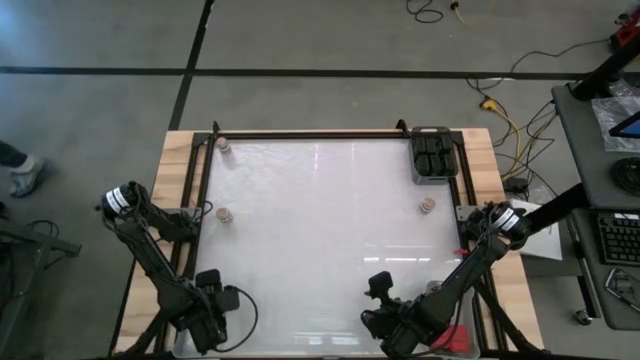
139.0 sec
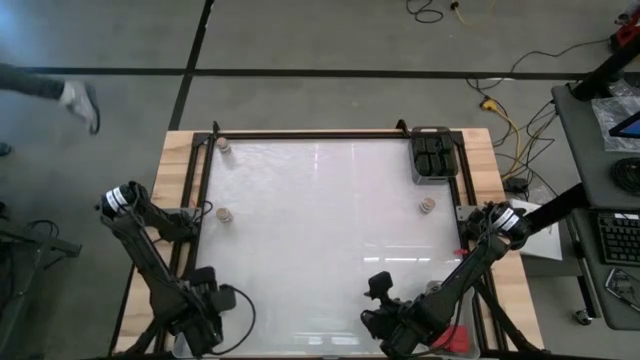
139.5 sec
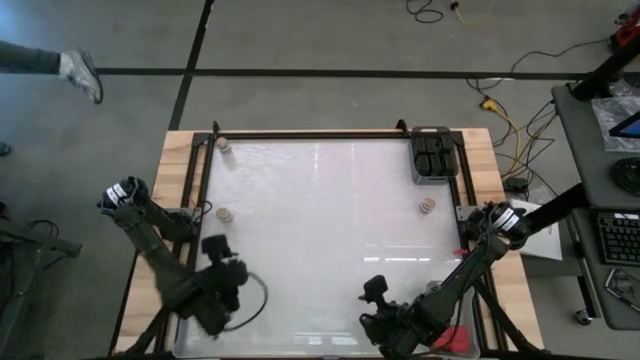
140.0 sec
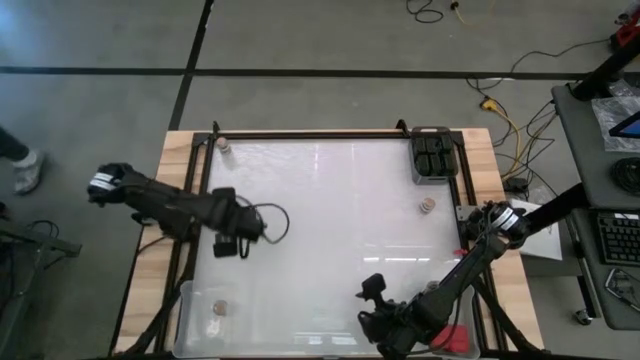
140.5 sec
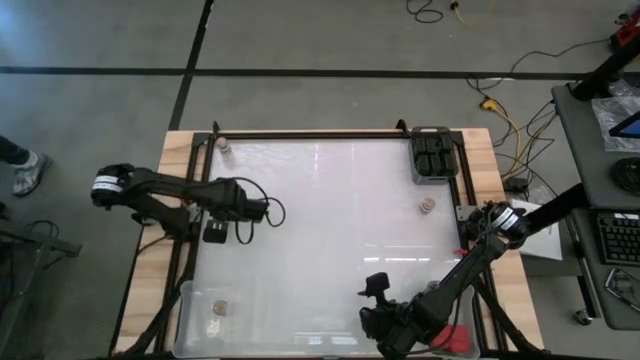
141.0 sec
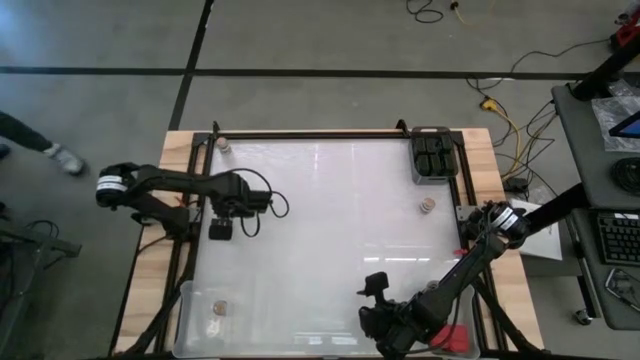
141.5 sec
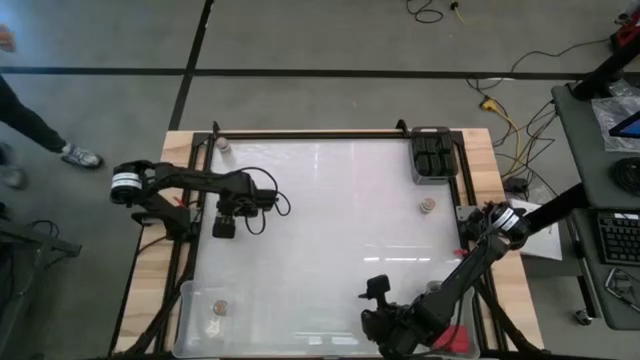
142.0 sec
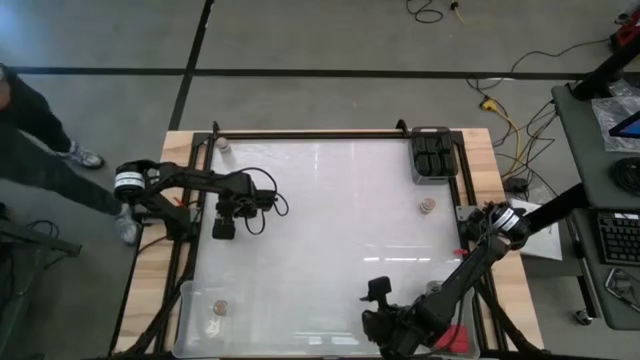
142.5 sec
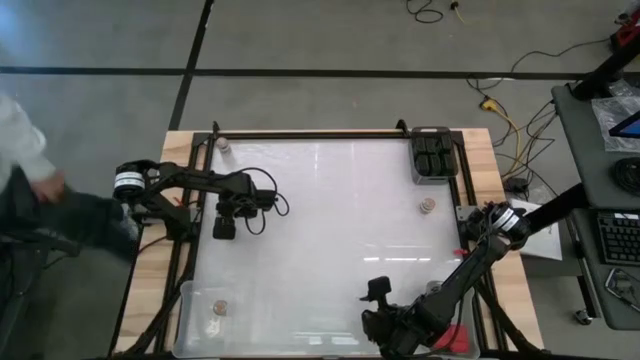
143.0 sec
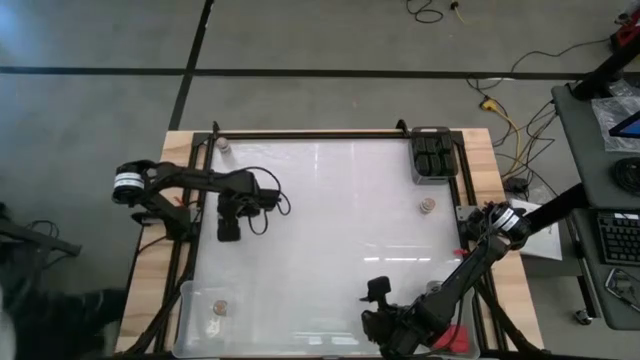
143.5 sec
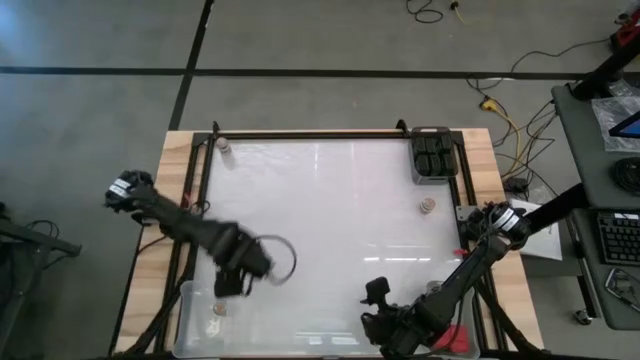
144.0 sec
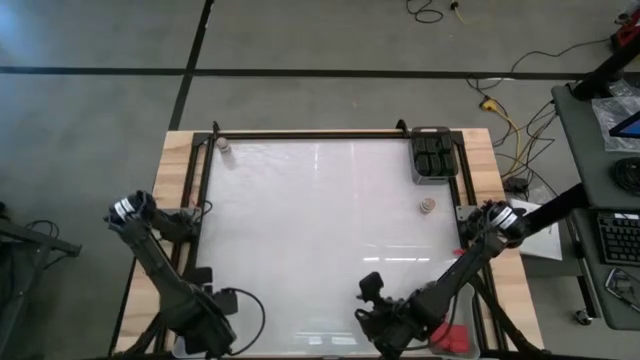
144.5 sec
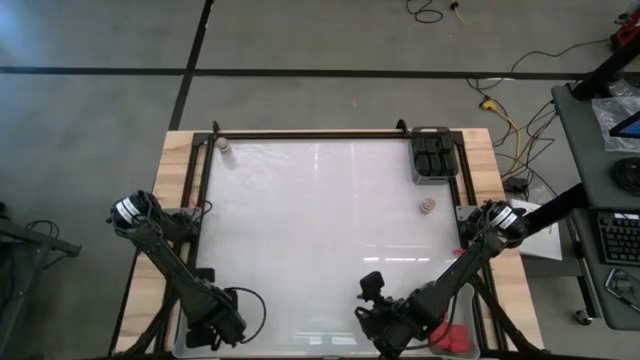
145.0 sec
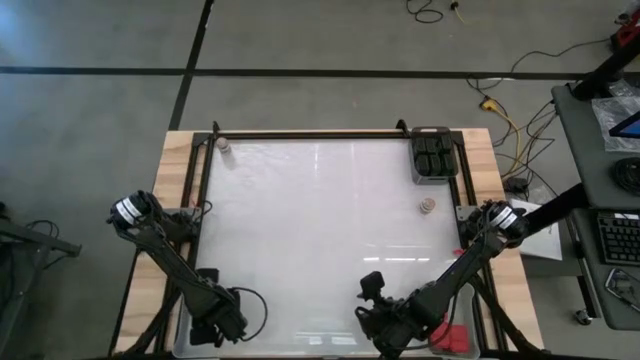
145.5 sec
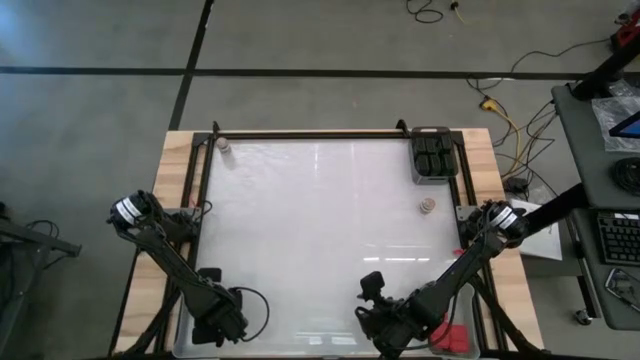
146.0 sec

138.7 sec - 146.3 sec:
Task: Sort spices by type
Put the brown seasoning bottle into the transparent bin

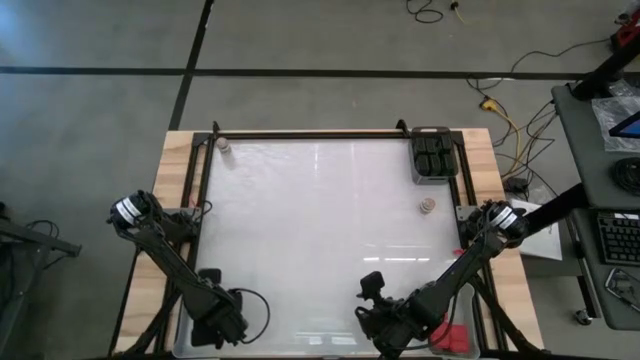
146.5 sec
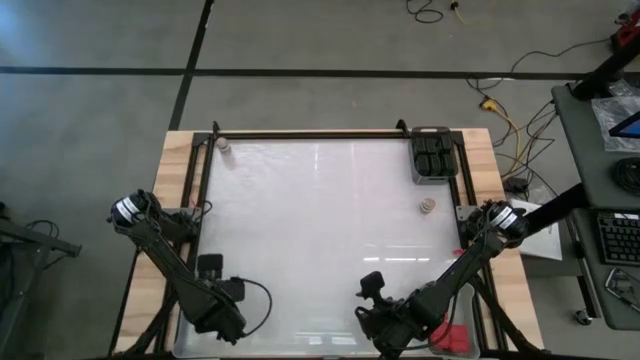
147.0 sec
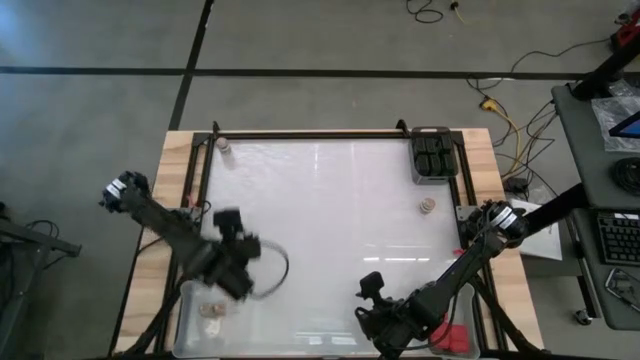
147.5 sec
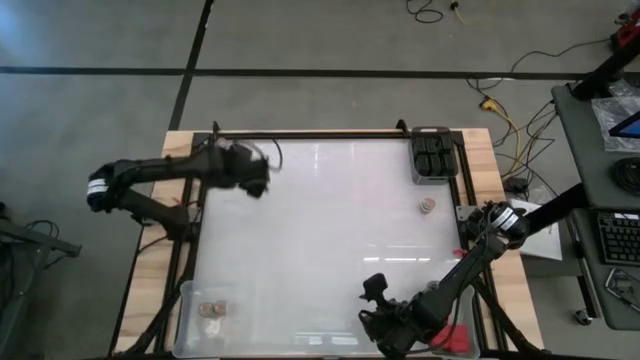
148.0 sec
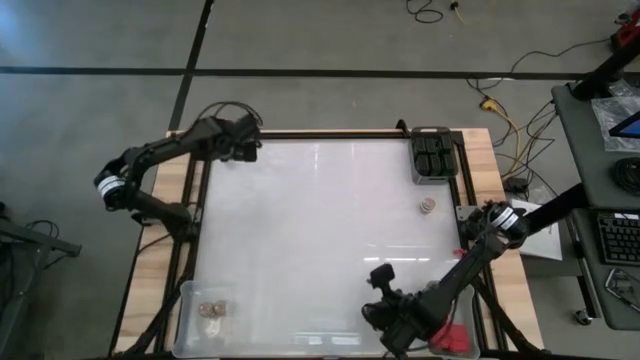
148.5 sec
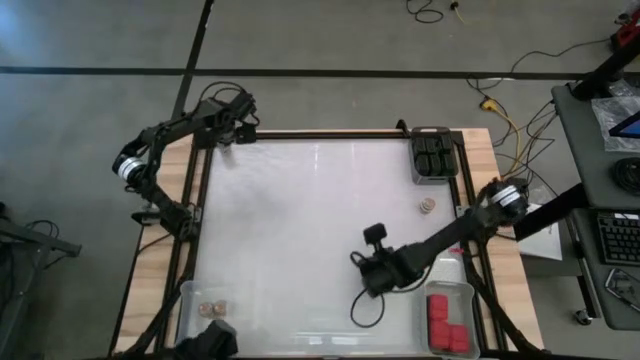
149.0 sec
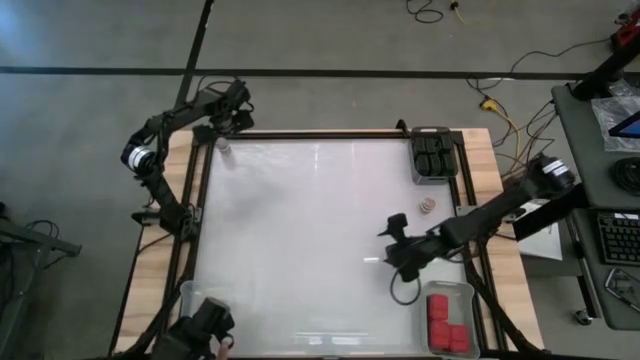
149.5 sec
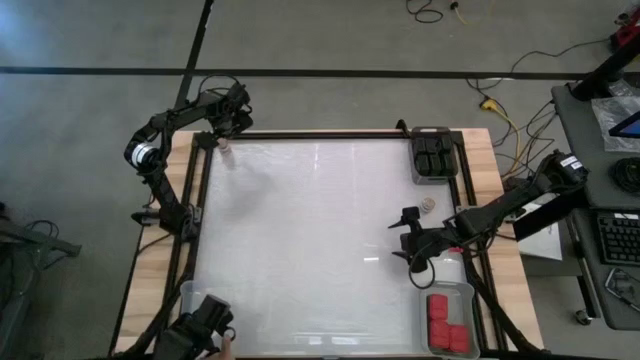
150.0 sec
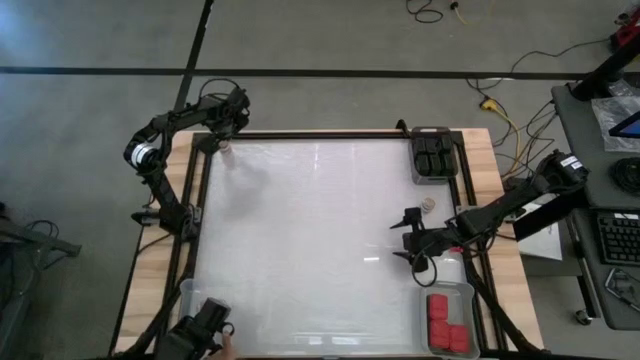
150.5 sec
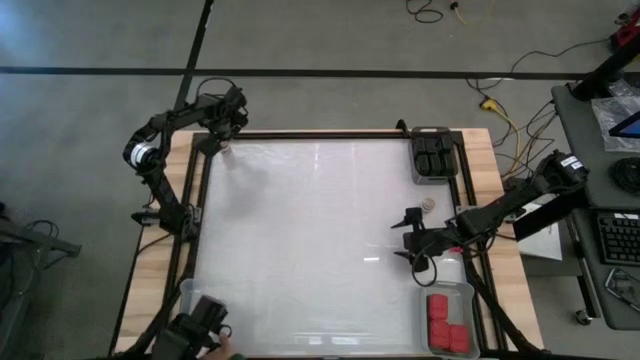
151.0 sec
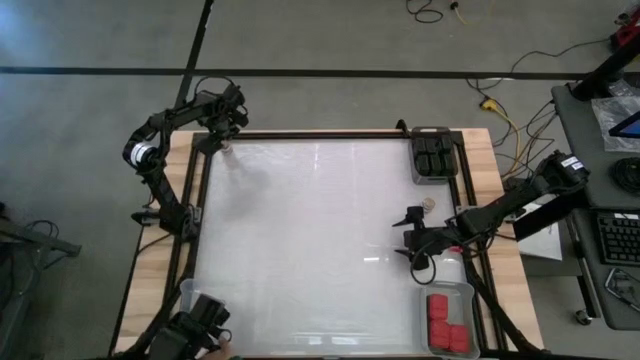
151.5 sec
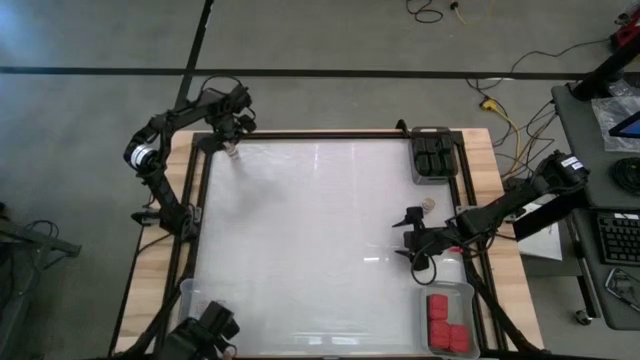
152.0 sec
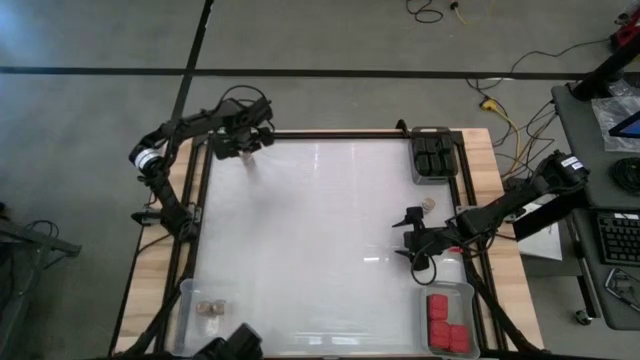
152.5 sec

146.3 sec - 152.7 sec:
Put the brown seasoning bottle into the transparent bin

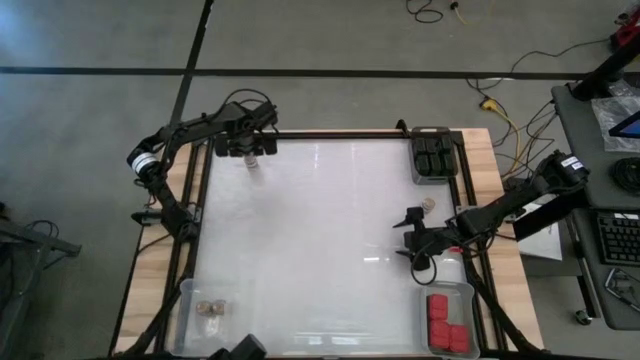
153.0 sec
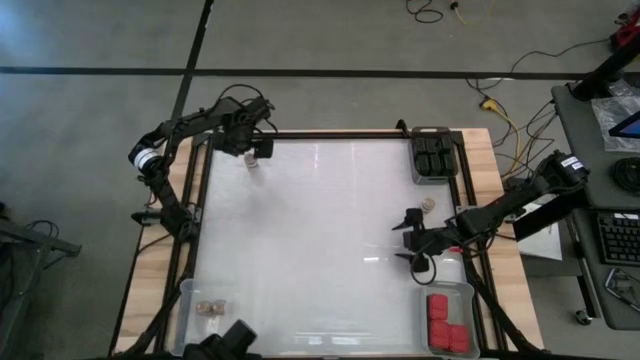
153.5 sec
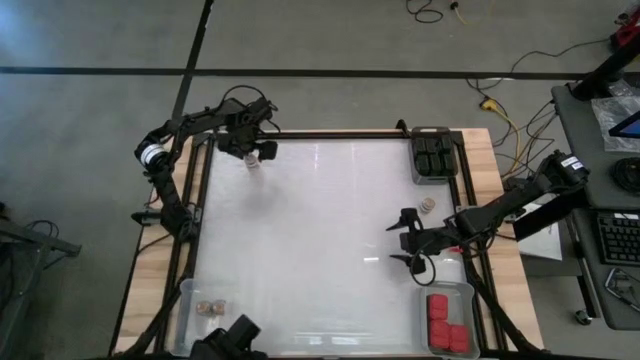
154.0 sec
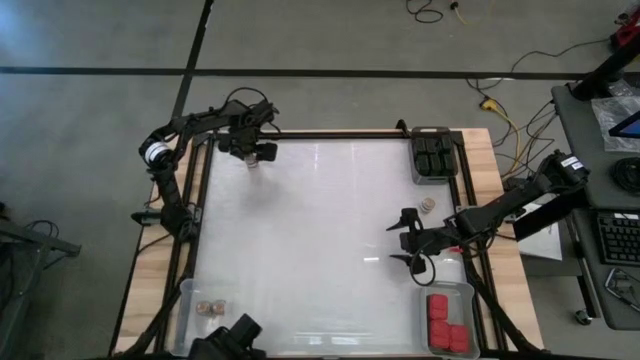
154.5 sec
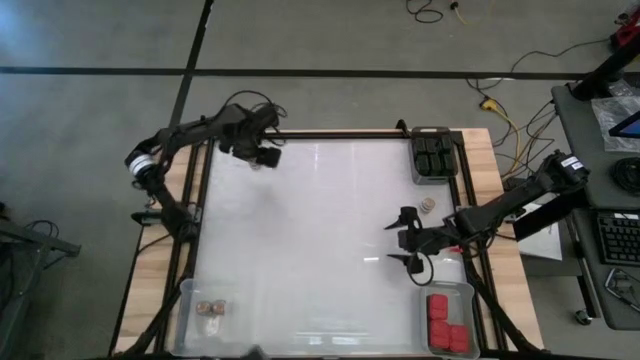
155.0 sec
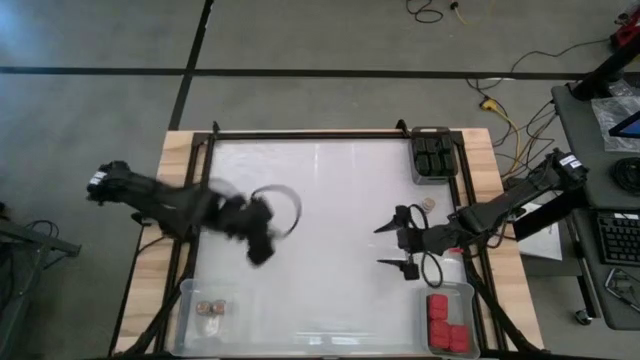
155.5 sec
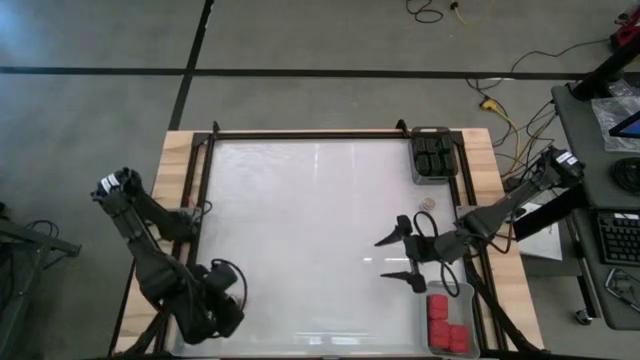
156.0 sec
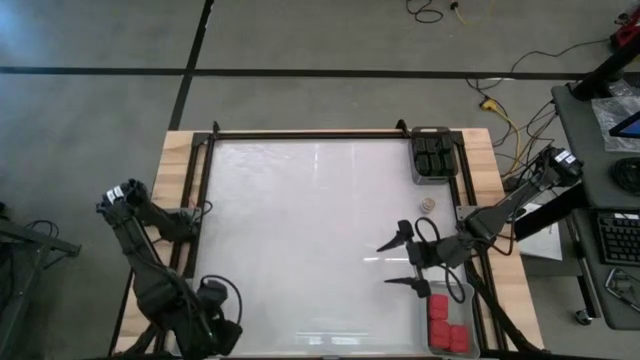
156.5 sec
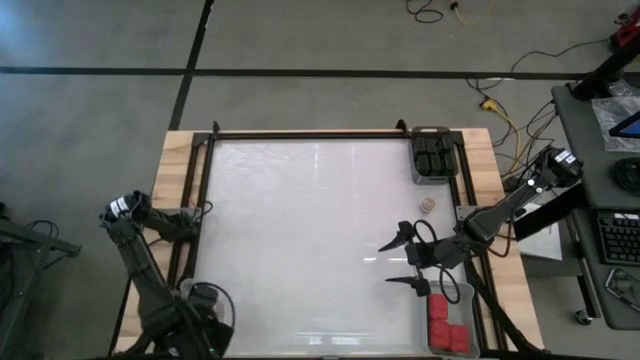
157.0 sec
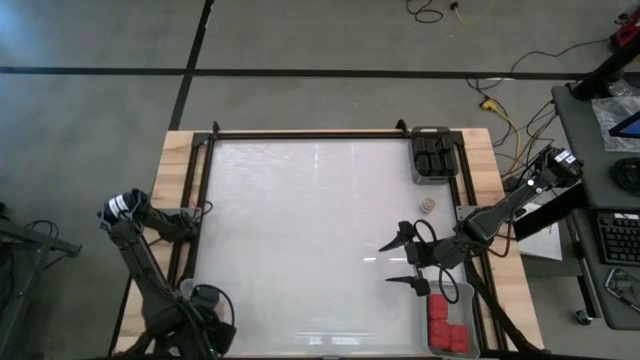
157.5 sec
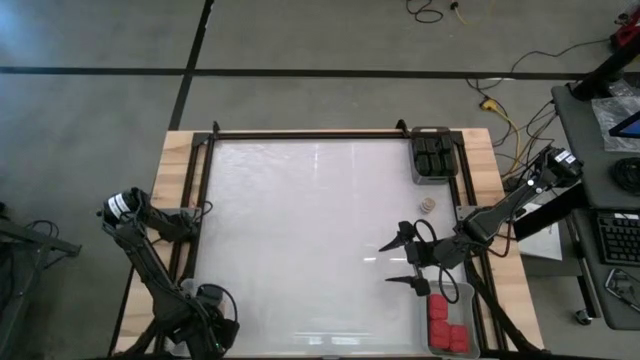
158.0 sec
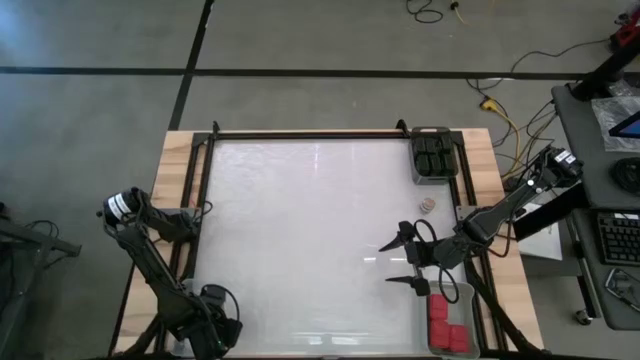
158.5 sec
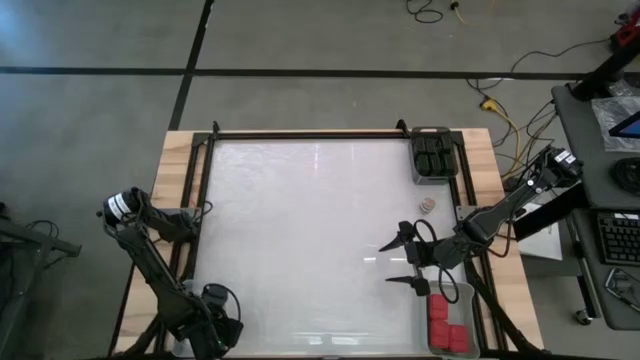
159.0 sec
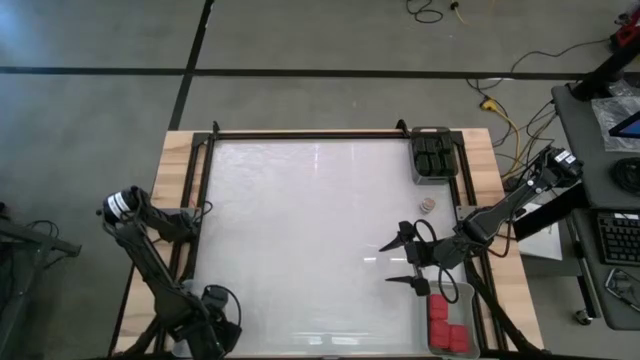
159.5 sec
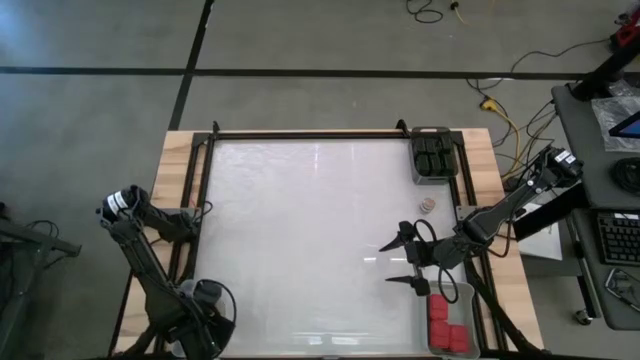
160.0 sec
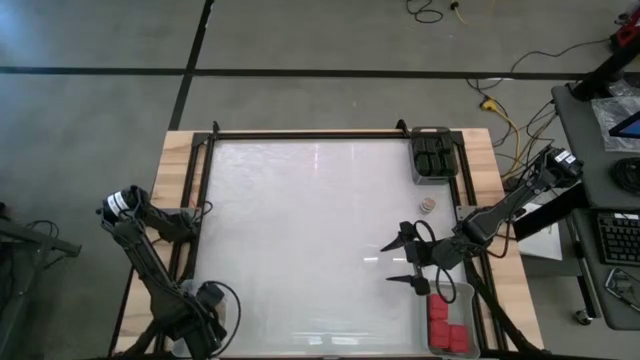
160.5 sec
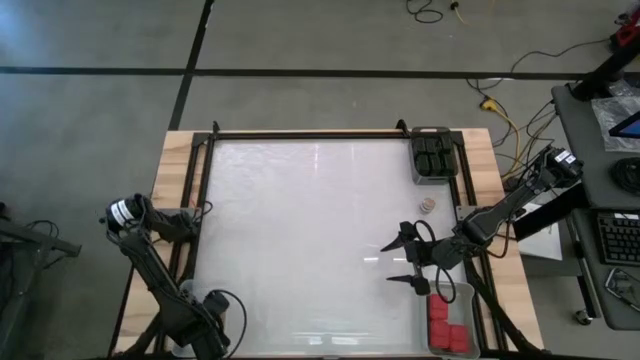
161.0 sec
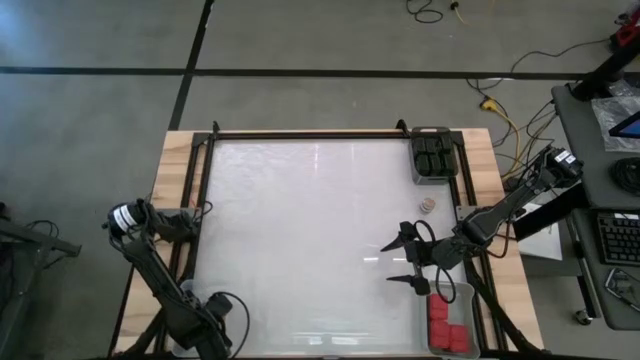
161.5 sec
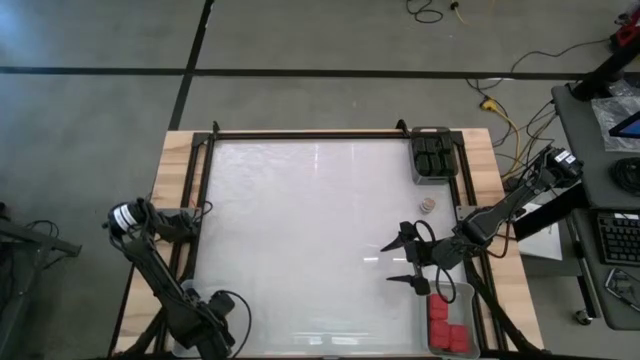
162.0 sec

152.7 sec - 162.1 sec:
Put the brown seasoning bottle into the transparent bin
